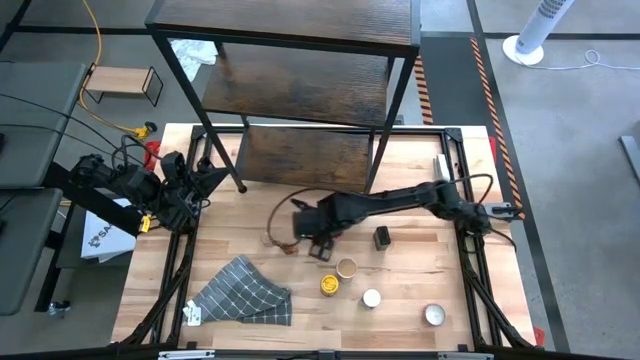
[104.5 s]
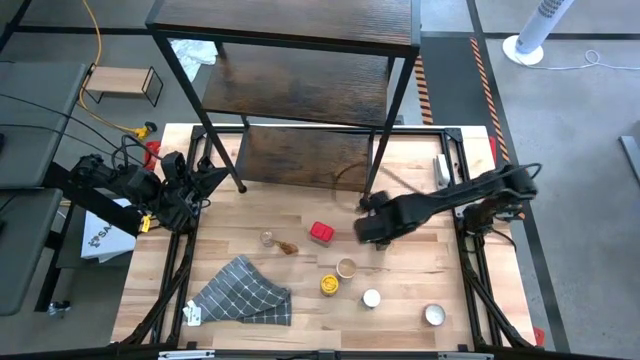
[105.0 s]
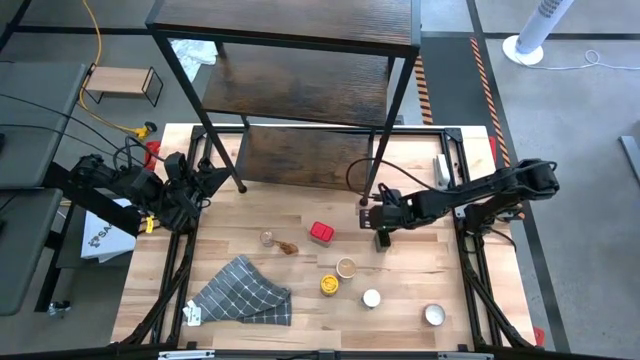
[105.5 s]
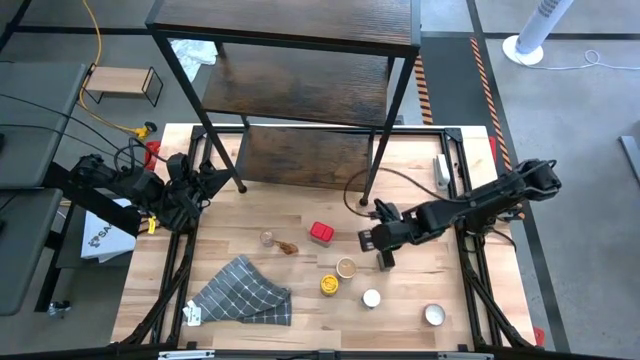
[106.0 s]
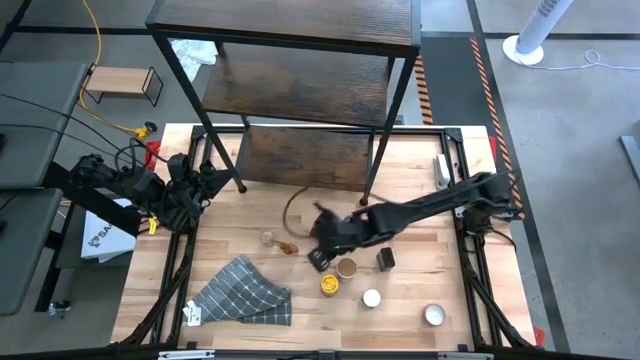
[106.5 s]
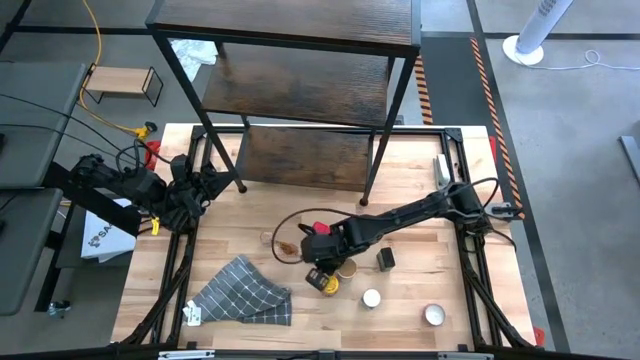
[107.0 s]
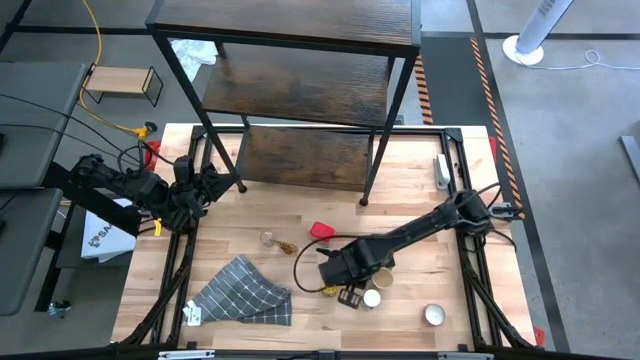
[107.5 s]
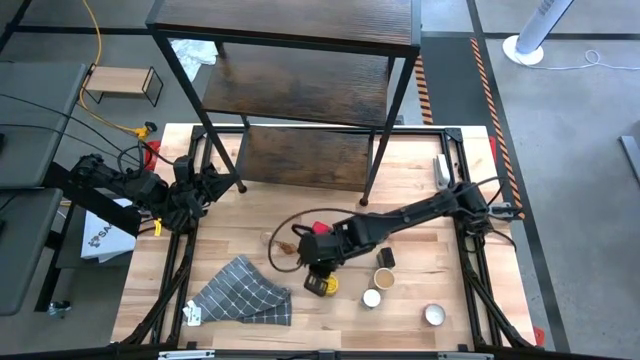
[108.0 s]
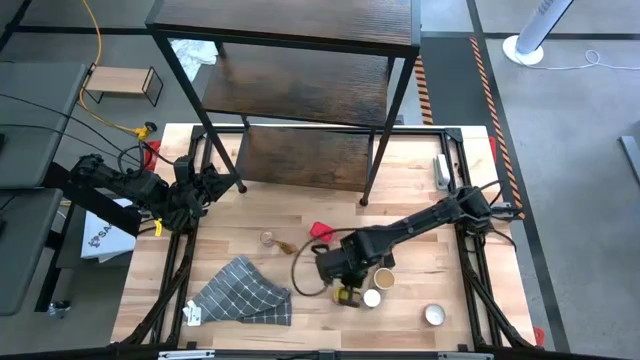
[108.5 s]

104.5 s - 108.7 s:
Task: Shelf spices
Adjust the seasoning bottles and cans

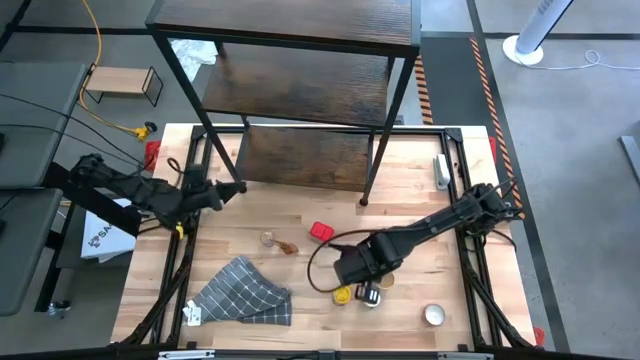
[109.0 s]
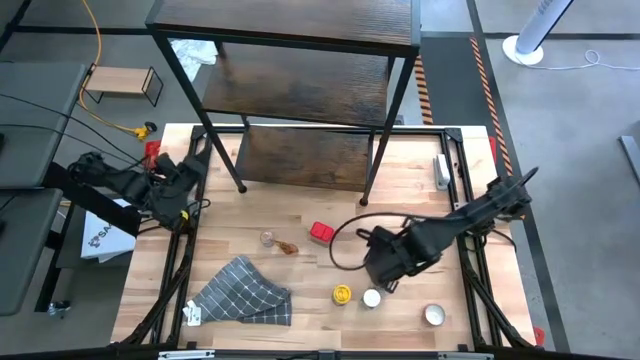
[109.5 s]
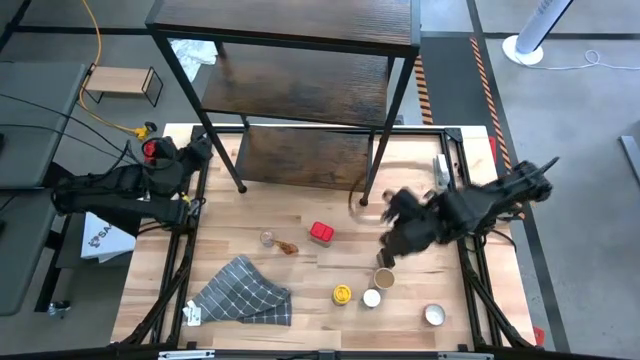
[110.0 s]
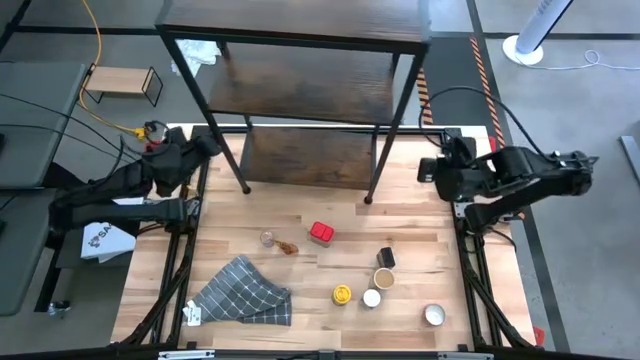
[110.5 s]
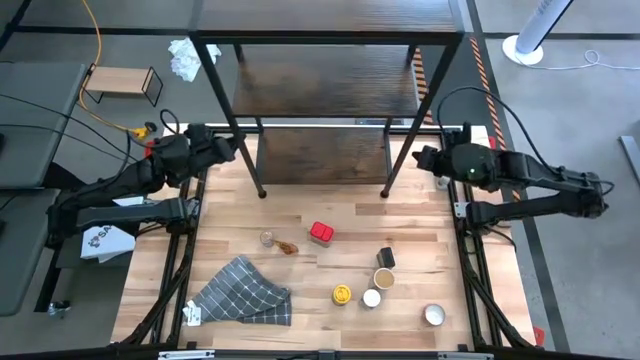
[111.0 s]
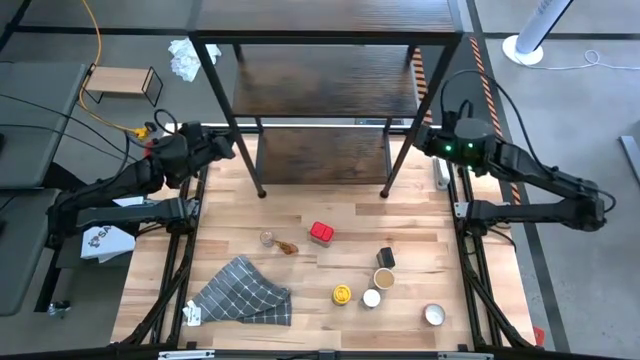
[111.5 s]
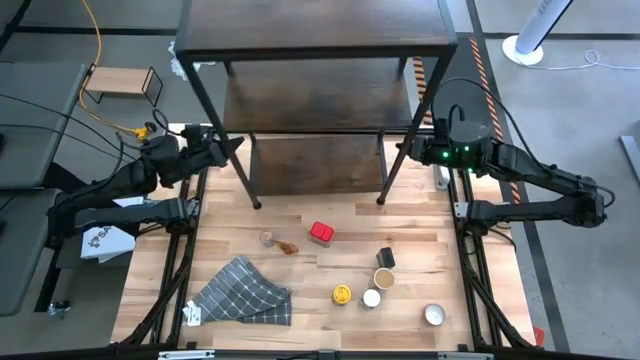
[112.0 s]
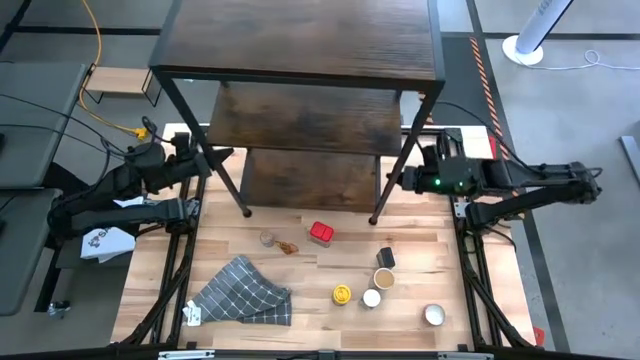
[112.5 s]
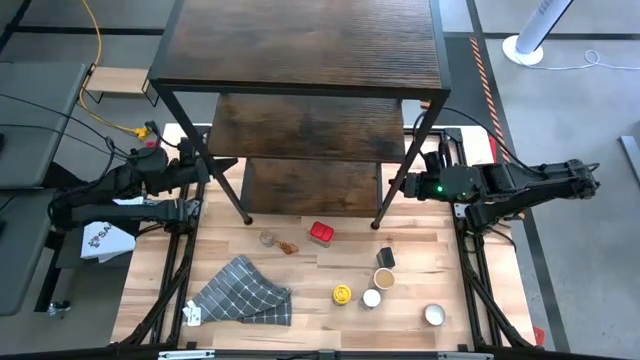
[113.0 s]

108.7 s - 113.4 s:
Adjust the shelf

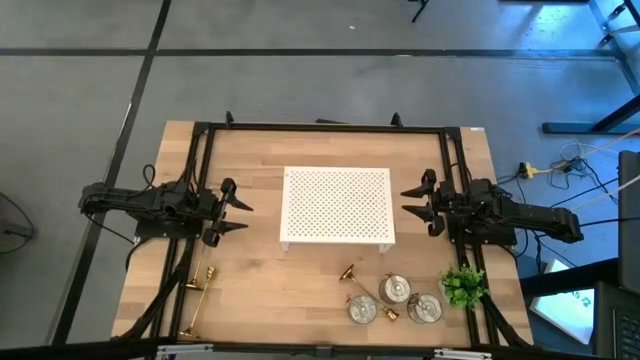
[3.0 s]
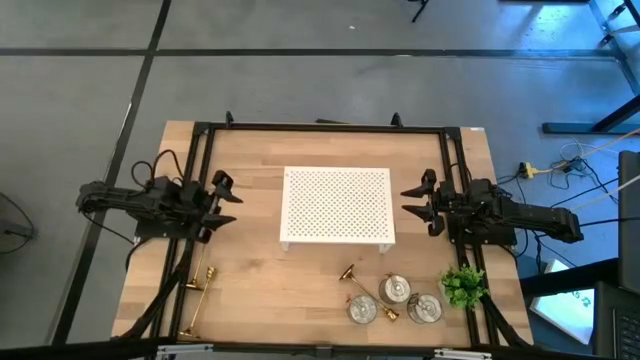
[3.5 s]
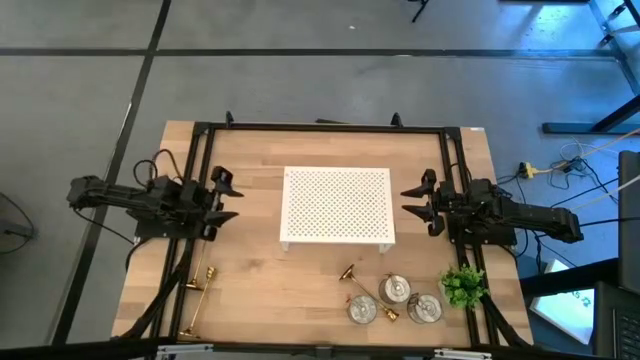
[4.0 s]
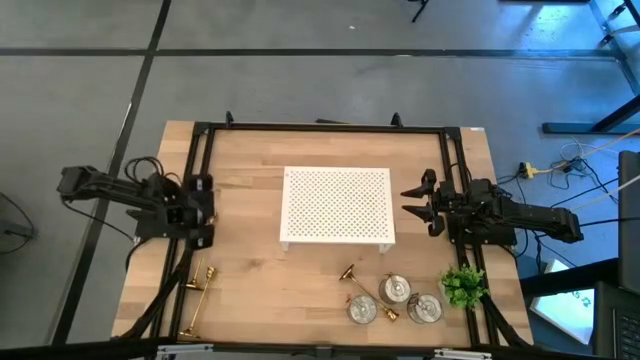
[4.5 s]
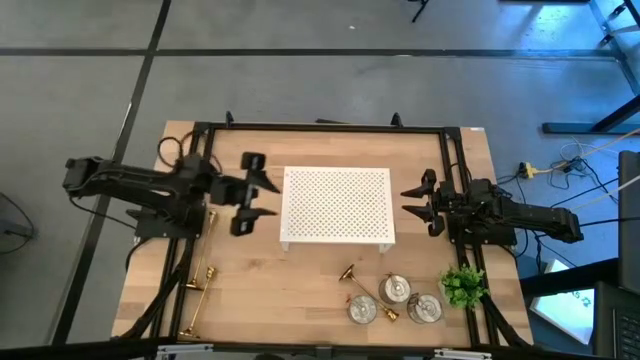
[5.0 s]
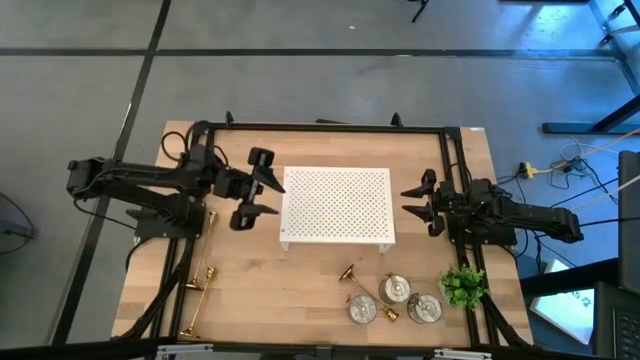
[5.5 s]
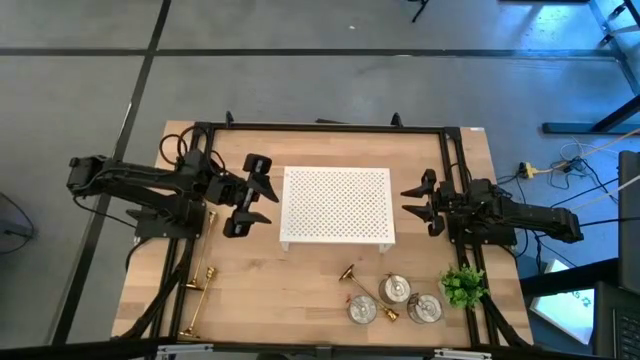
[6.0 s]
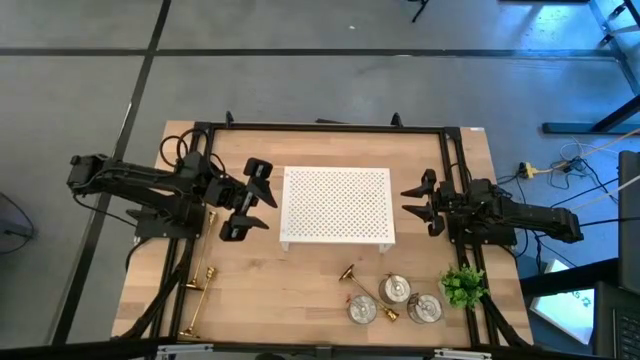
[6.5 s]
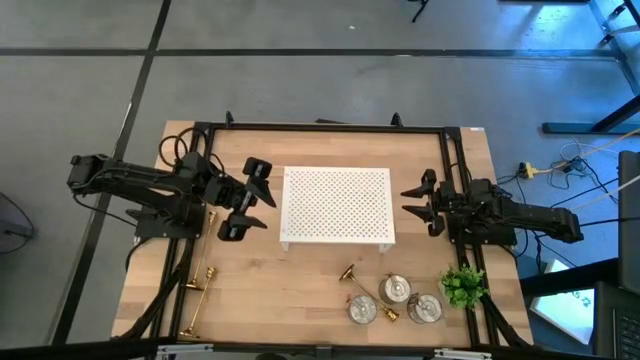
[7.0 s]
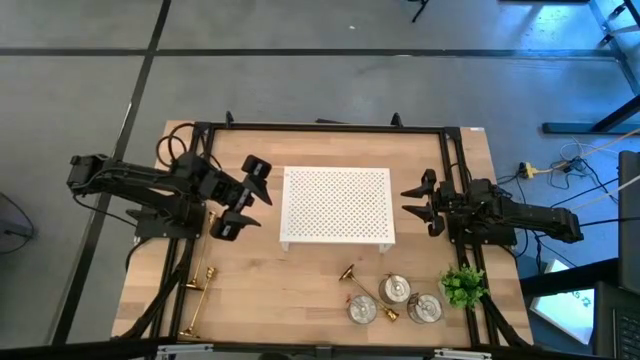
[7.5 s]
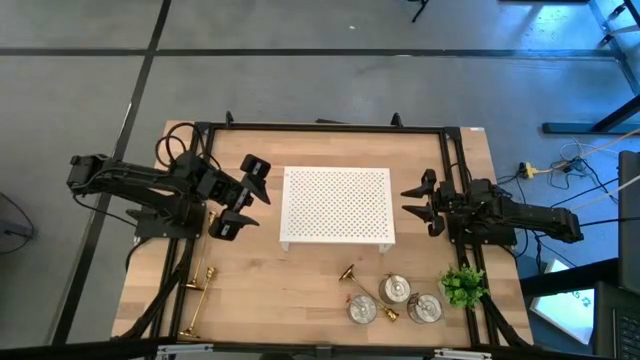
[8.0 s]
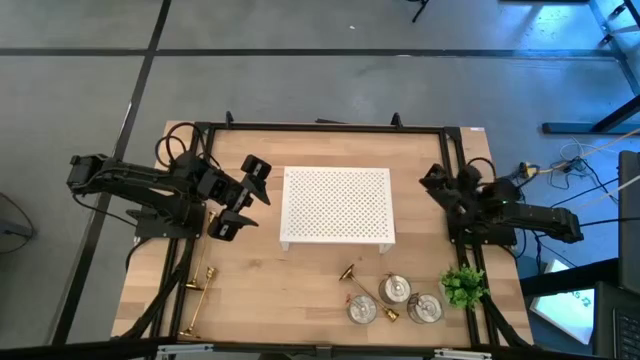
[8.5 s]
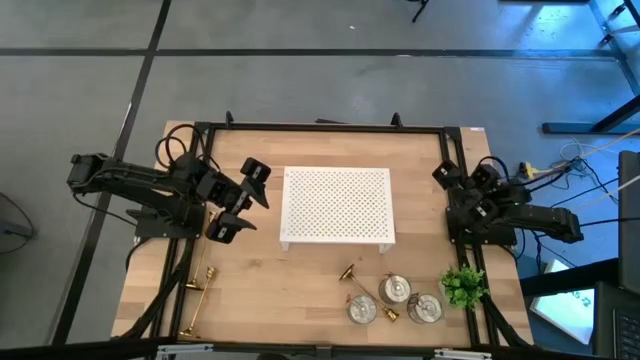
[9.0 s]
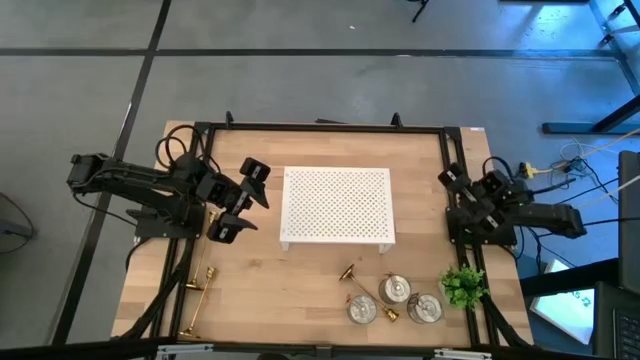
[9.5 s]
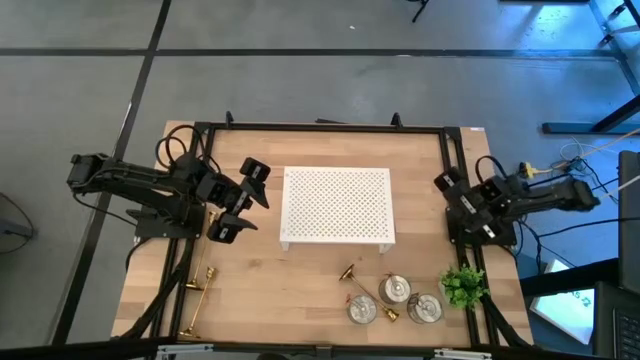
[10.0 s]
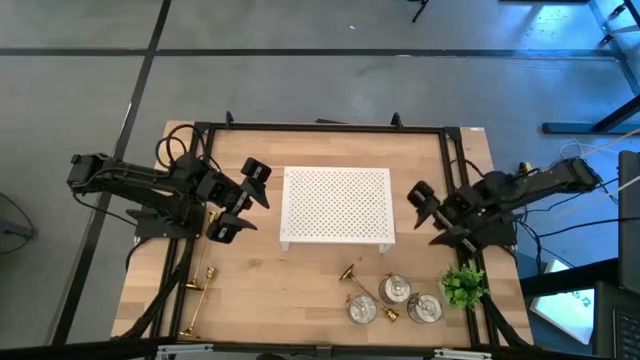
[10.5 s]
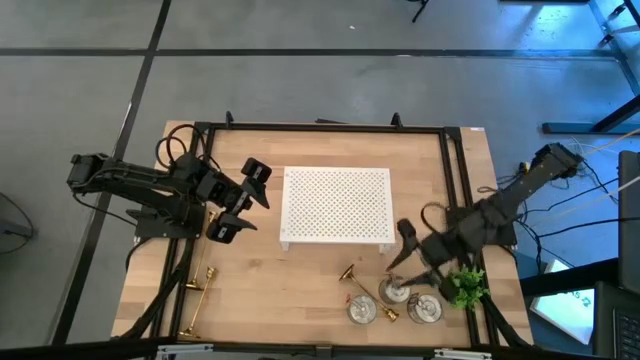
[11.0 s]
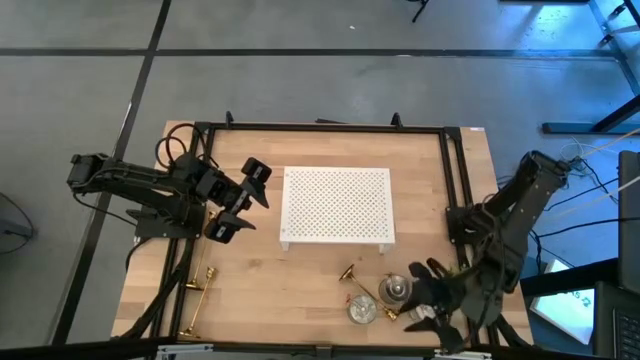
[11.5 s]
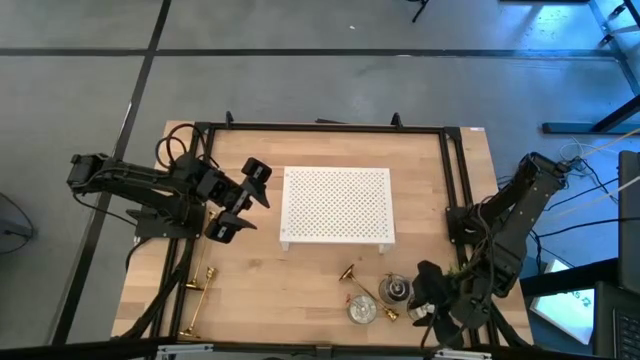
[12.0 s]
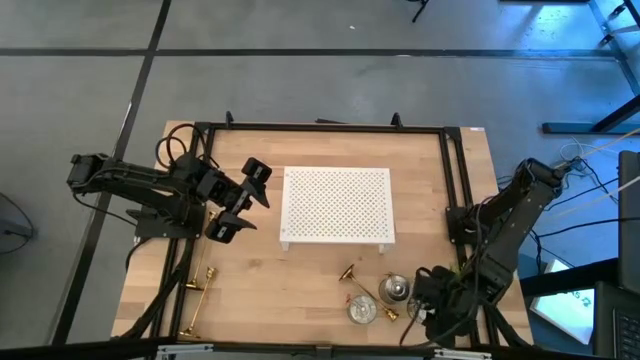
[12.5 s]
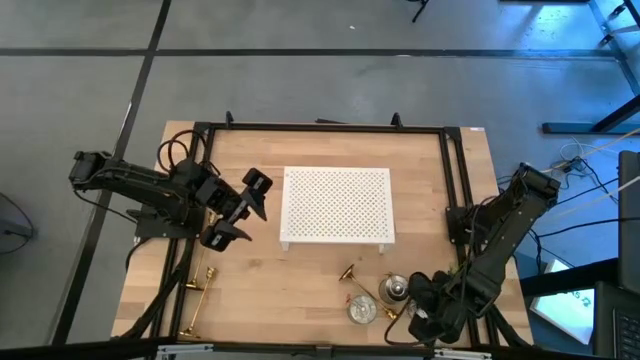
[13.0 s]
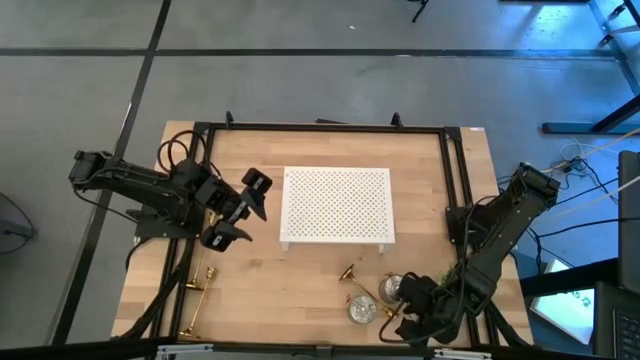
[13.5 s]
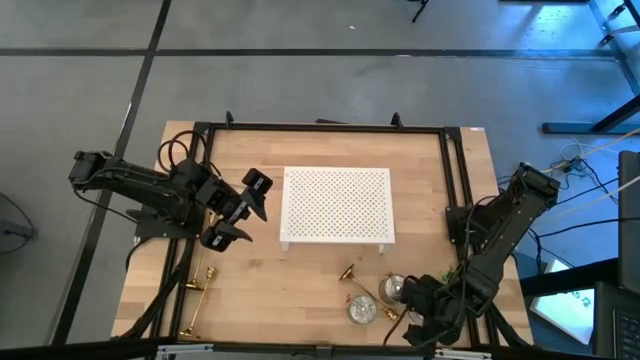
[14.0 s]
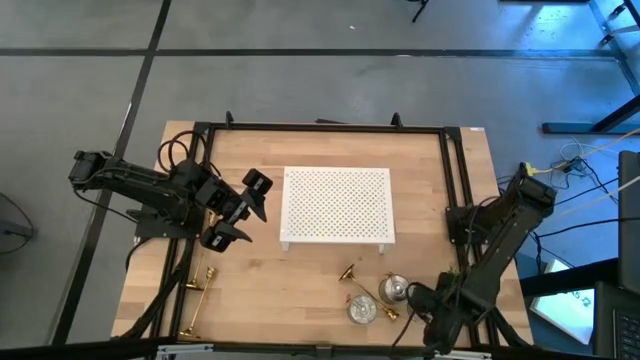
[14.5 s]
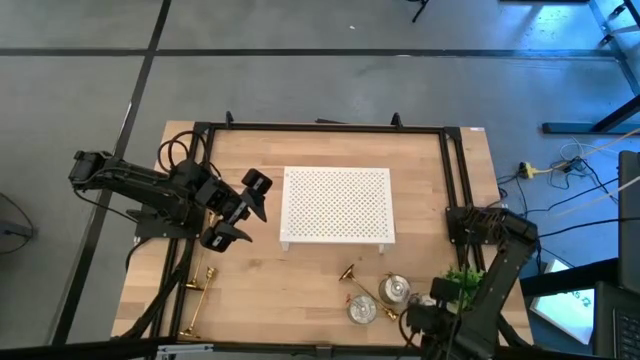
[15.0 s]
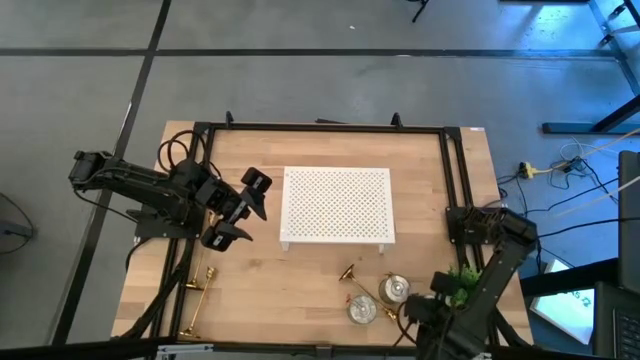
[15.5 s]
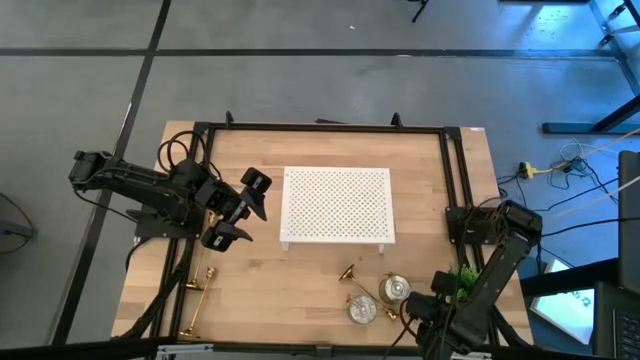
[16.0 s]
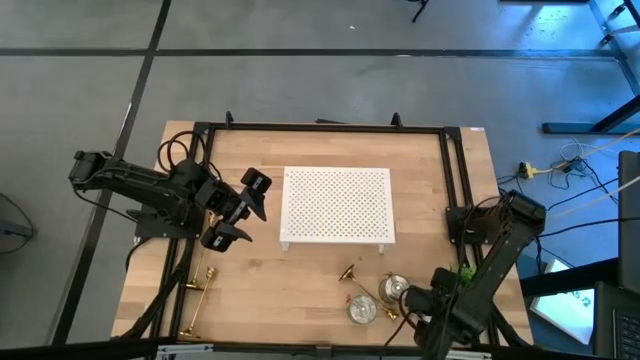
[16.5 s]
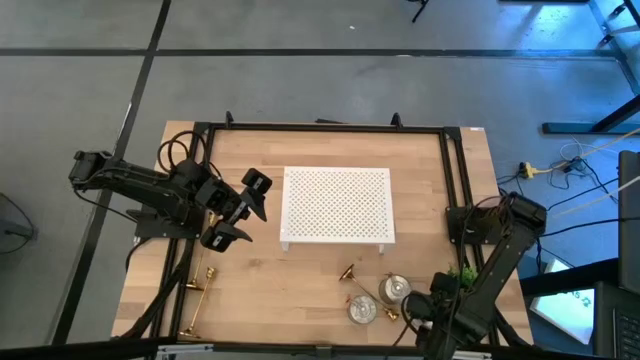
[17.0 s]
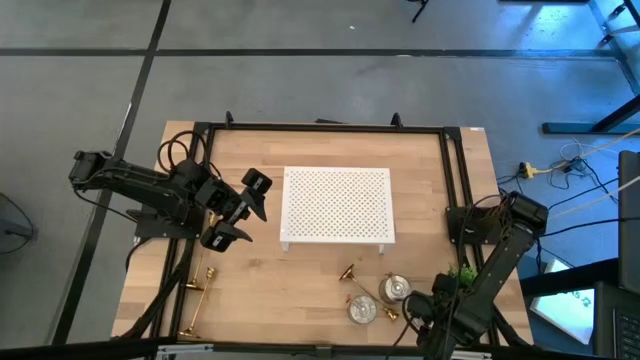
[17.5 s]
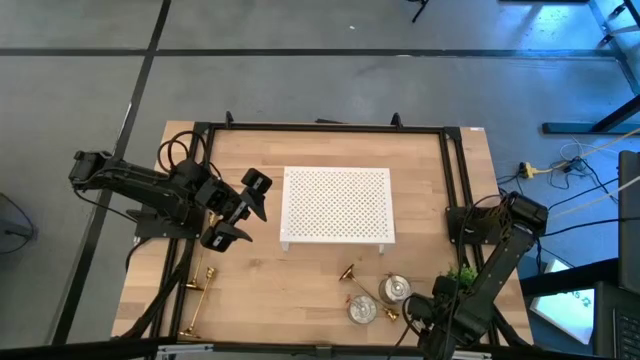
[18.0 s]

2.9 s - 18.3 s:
Task: Pick & Place candle stick holders
Put the right silver scented candle on the shelf
